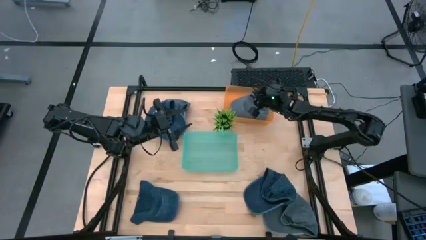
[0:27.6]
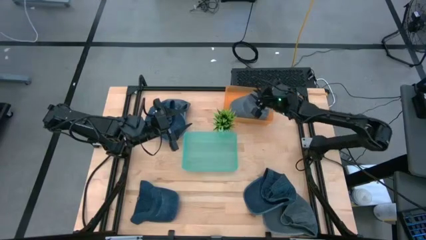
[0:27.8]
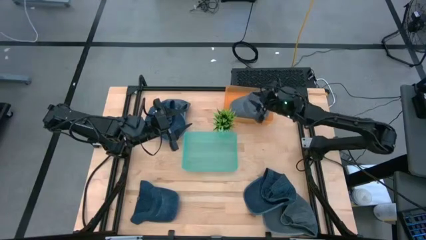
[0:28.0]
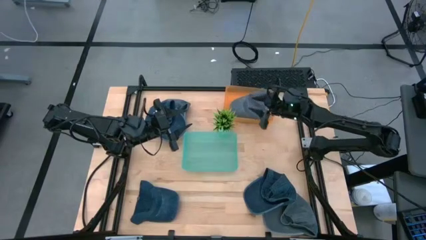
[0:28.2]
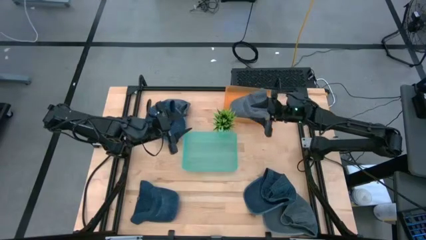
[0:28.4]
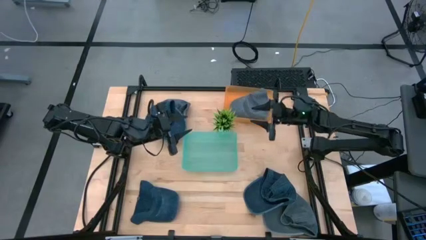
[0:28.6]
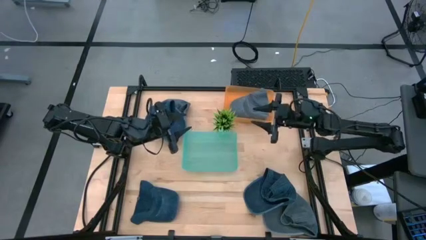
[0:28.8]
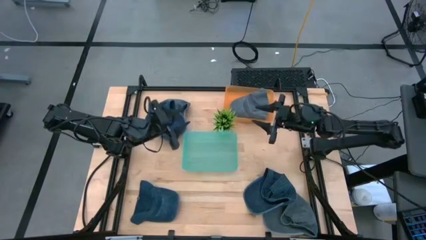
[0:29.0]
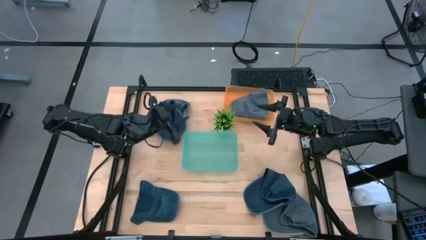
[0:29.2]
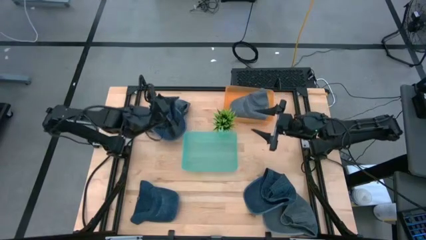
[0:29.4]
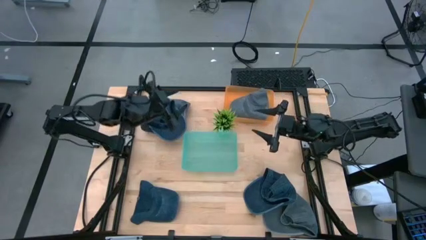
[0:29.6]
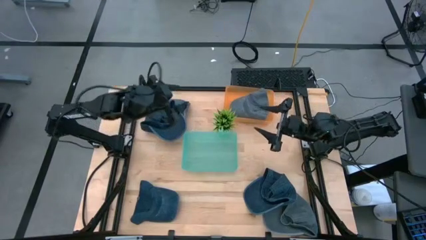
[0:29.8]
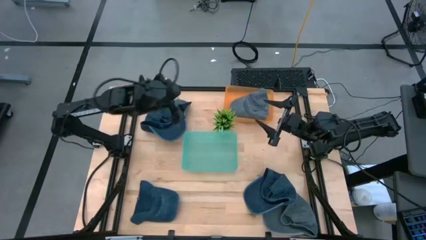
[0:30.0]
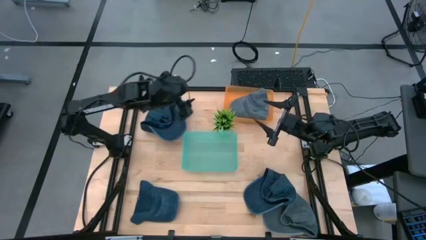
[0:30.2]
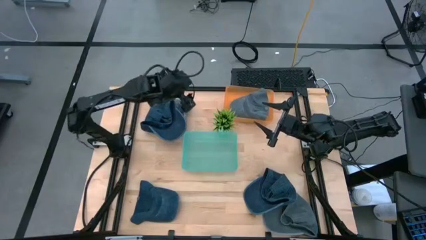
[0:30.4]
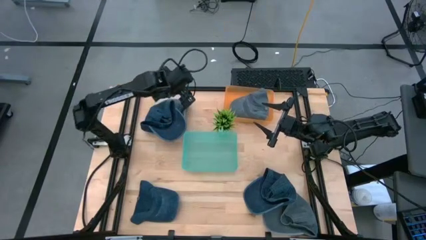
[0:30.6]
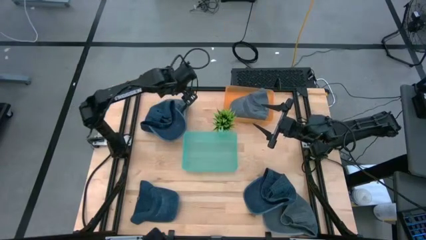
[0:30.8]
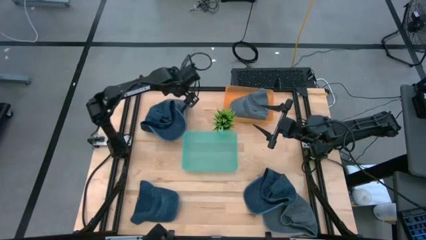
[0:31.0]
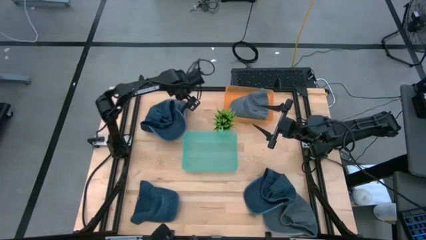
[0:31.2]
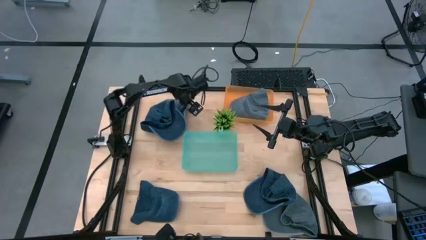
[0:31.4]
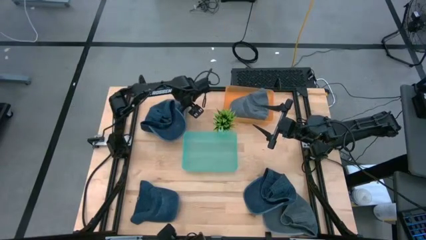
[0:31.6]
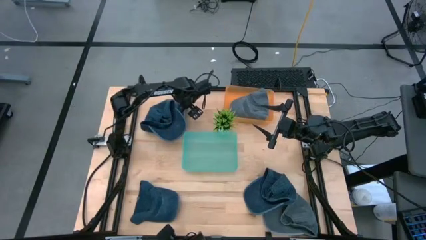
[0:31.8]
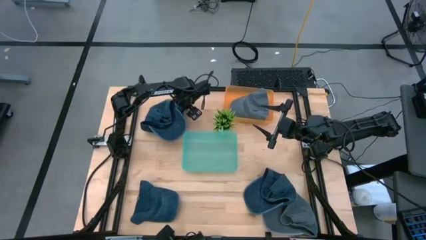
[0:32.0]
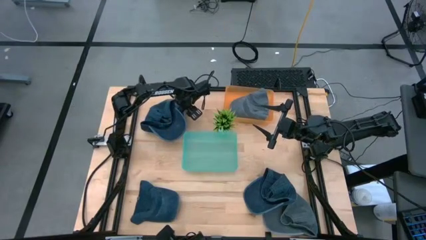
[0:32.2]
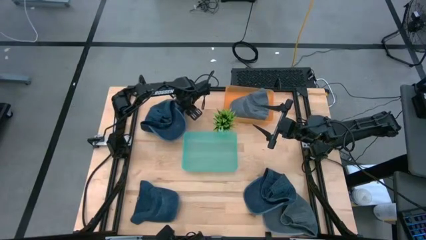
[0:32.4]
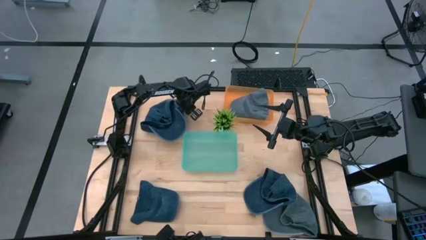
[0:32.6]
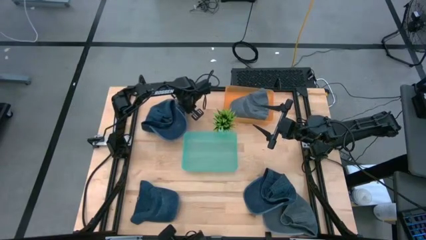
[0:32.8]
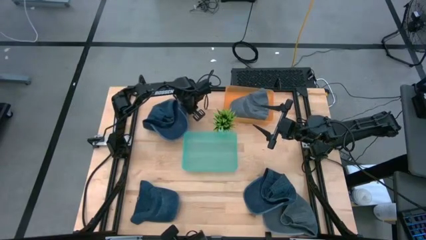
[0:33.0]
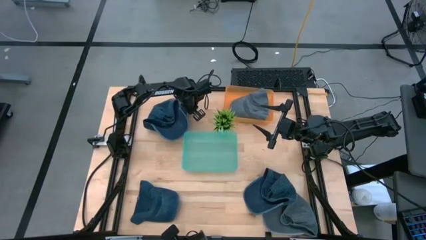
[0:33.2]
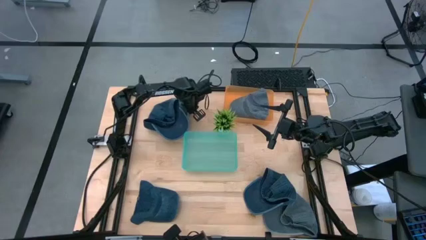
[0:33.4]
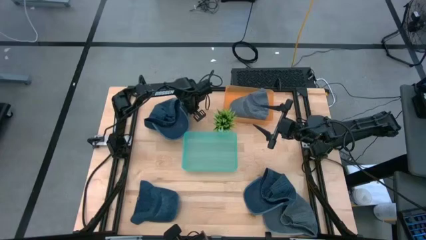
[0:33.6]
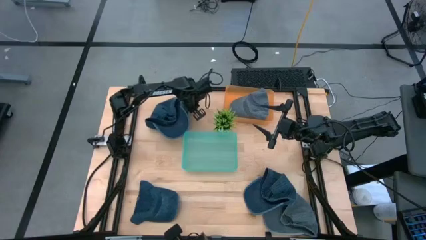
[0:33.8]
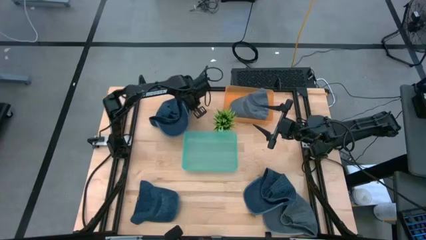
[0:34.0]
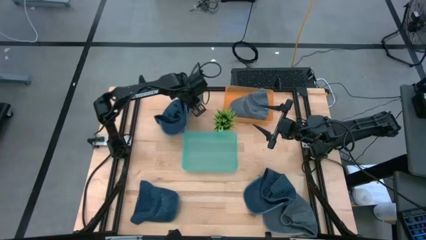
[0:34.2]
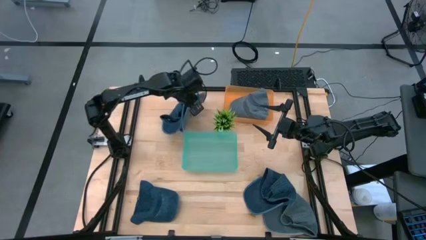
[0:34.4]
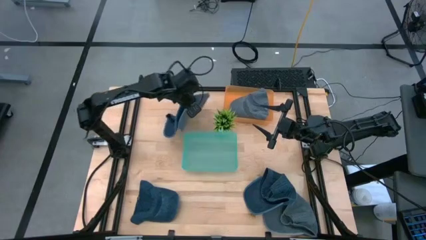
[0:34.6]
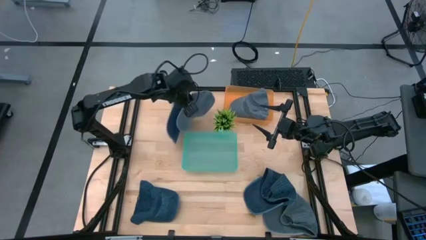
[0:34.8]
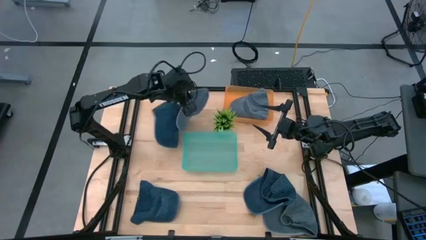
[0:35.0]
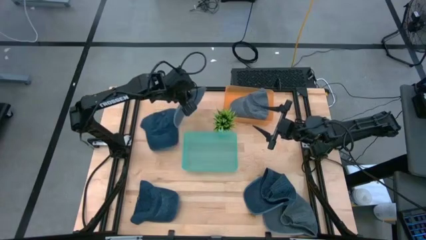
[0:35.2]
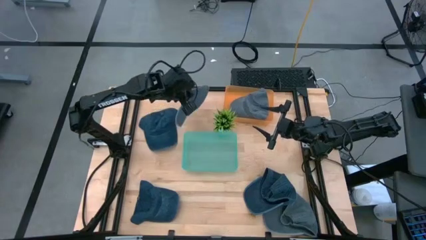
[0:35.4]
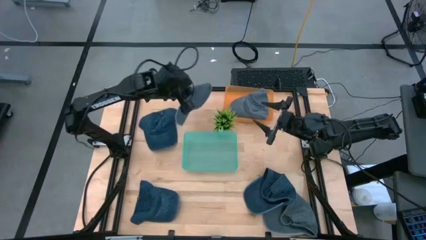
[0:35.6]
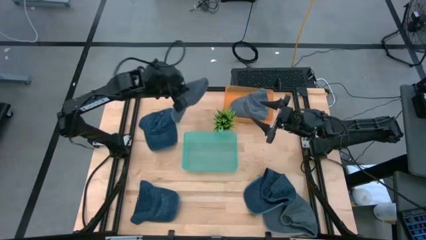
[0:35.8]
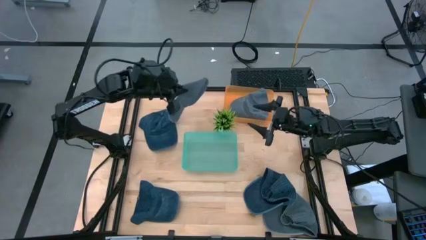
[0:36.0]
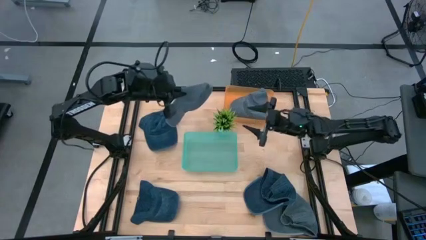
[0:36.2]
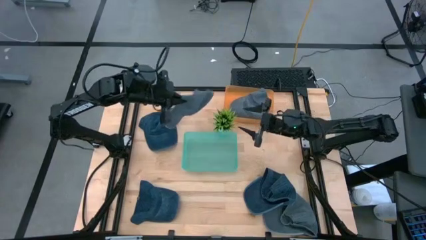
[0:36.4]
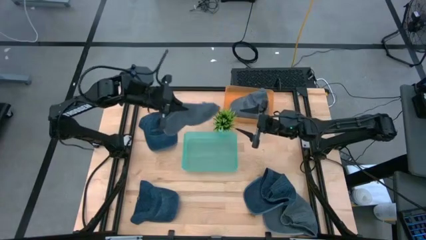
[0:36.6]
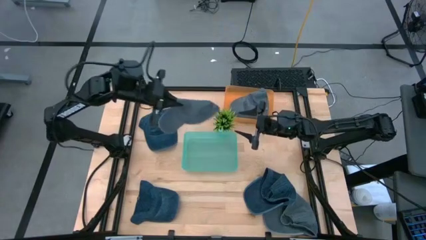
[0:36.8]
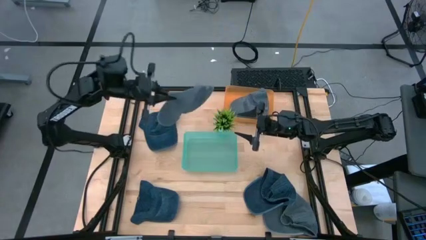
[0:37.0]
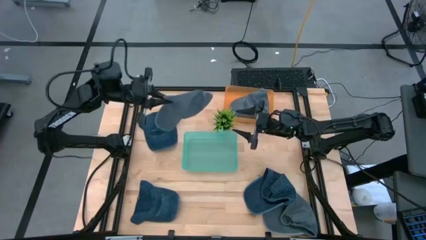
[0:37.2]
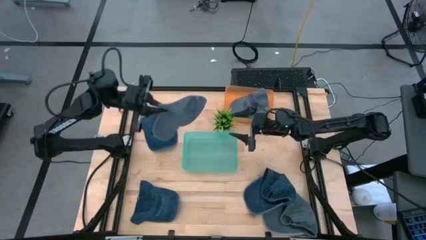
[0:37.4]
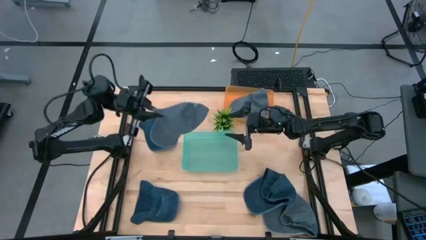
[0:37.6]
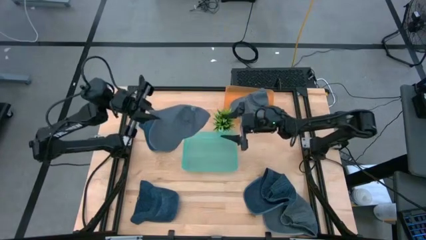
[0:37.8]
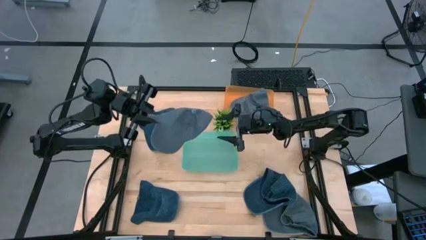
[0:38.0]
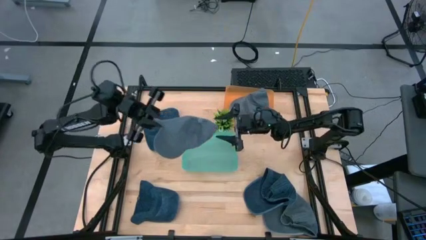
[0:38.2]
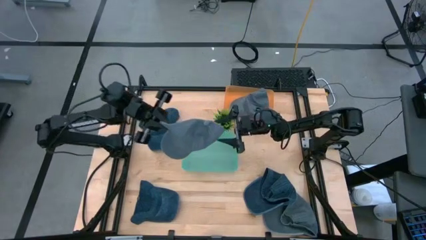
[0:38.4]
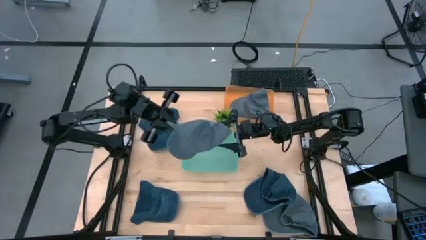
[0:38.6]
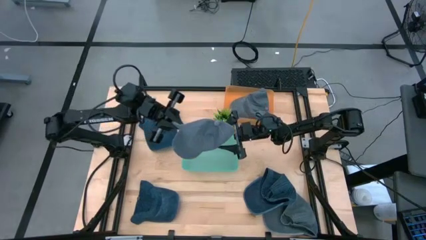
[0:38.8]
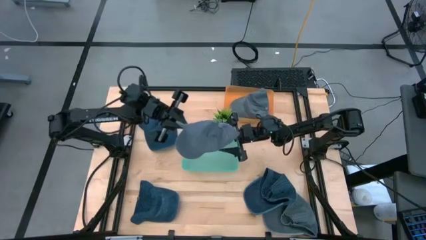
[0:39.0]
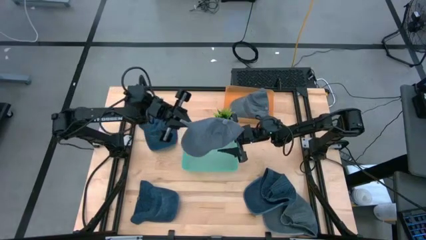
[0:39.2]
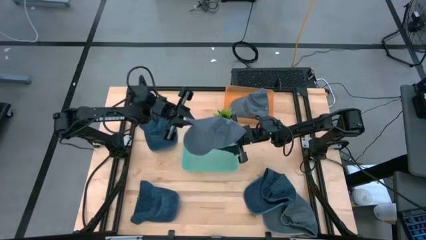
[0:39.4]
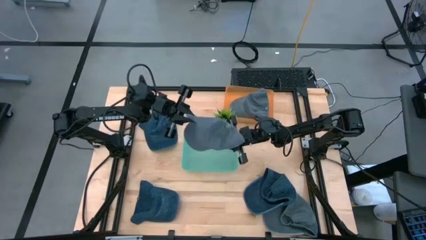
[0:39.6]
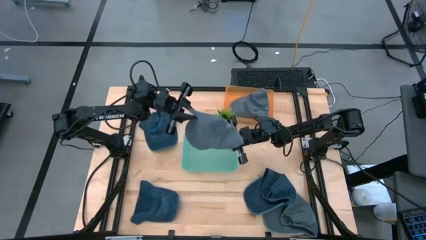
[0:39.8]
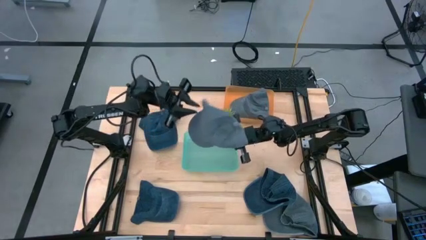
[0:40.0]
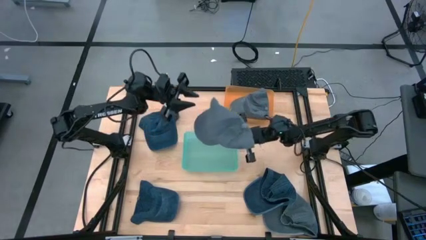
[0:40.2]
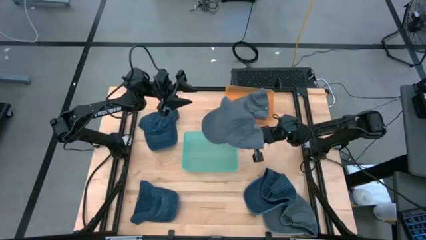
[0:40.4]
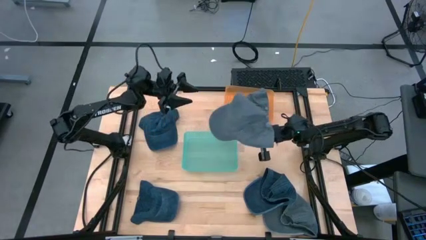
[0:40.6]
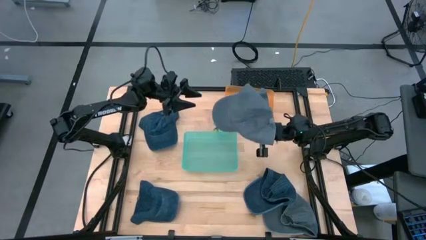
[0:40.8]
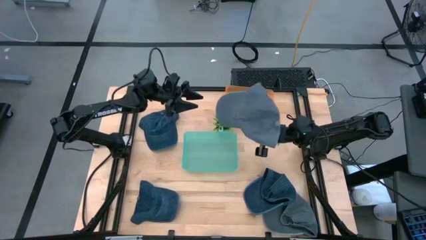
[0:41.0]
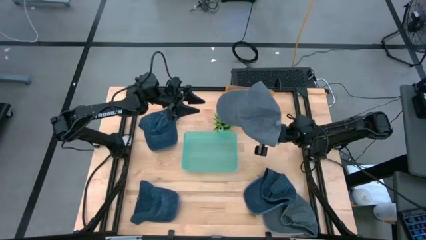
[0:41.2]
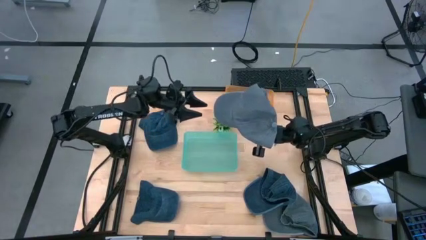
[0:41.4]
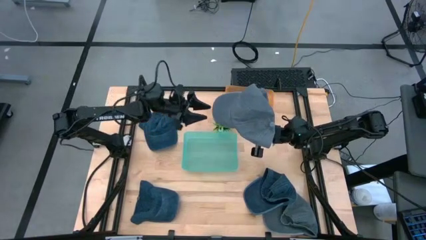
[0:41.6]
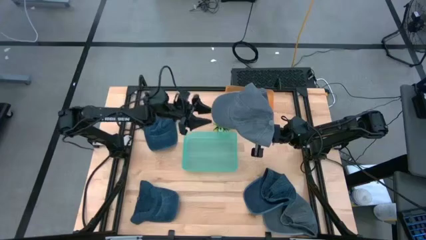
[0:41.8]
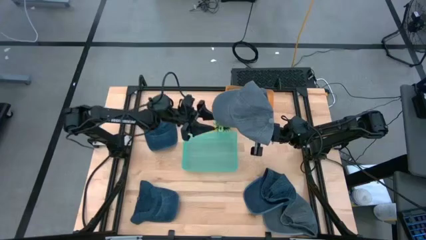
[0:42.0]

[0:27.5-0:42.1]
Task: Pick & Place hat
Put the top gray cap into the orange bin

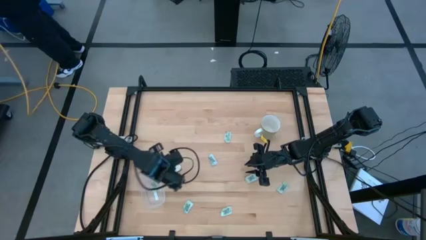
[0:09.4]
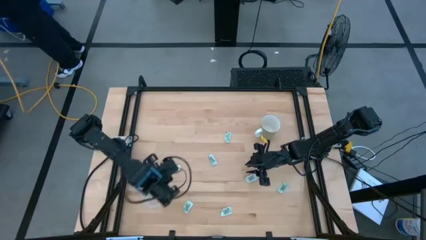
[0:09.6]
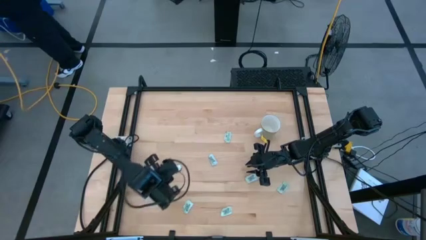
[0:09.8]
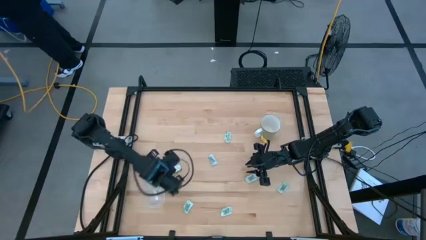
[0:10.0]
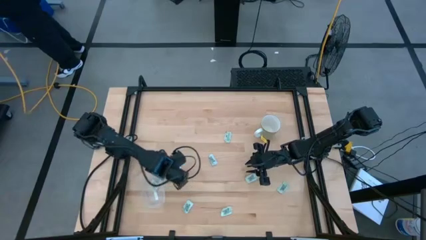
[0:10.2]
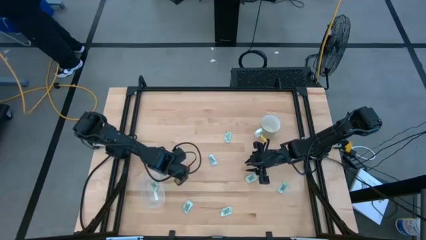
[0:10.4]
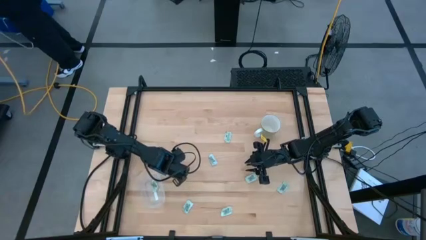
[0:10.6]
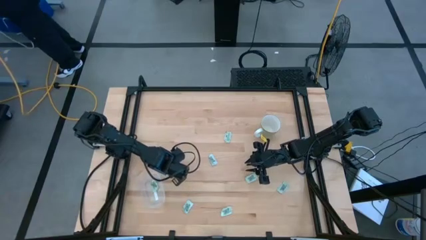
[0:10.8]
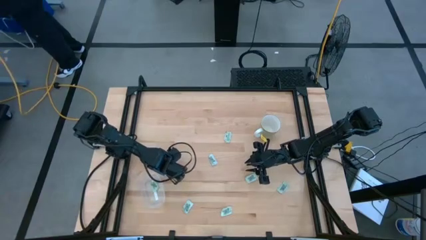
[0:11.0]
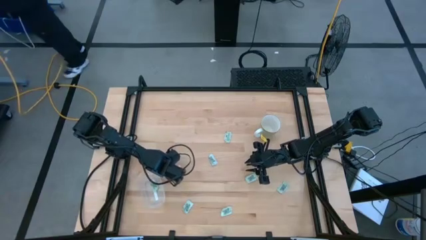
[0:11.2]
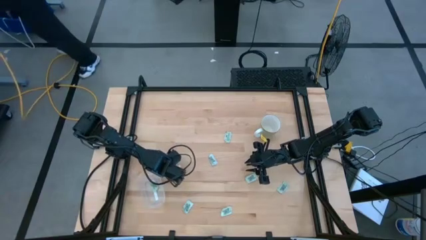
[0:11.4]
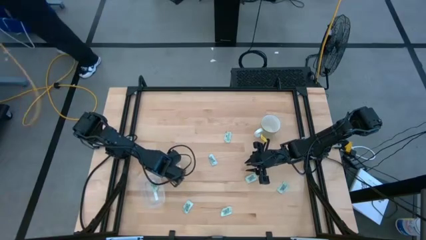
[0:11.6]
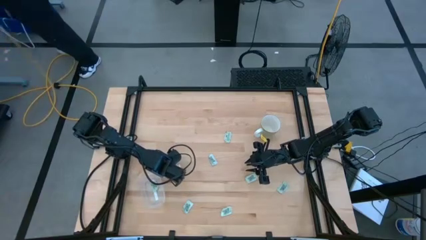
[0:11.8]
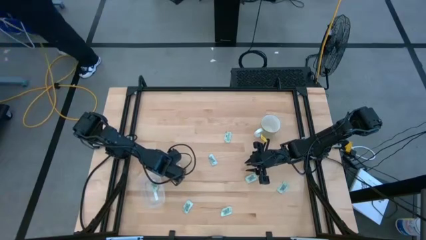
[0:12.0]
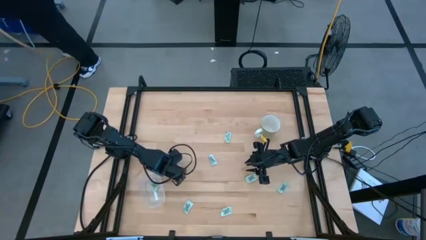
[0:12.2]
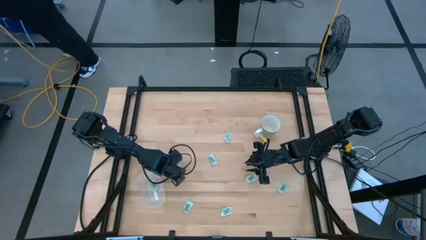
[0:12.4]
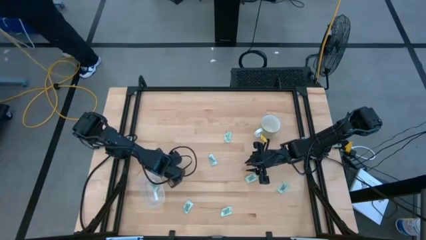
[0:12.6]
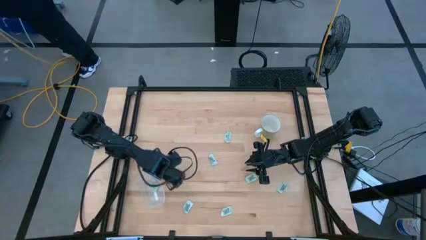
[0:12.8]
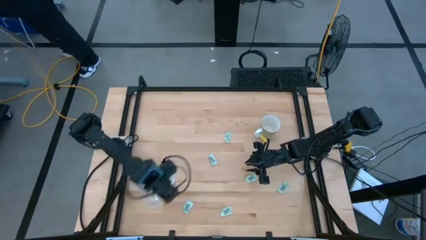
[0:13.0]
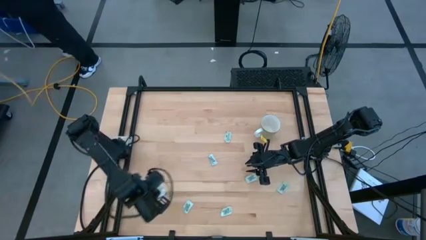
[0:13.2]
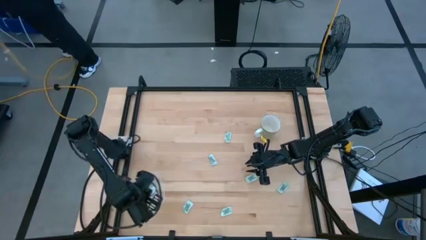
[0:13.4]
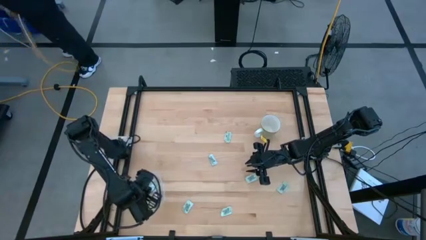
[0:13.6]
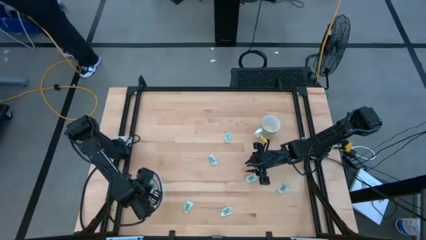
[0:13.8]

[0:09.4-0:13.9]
Task: Pick and place Stevia / Truvia into bins
Put the truvia packet into the transparent bin
